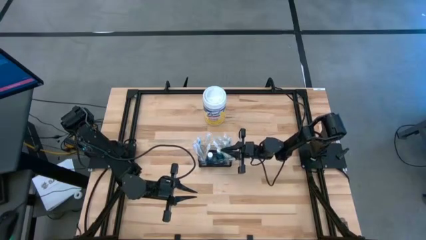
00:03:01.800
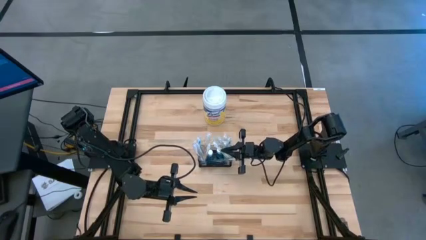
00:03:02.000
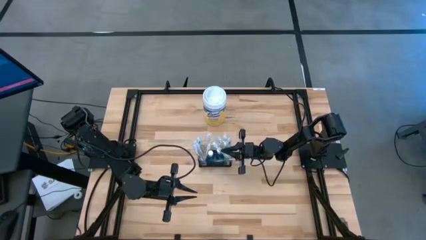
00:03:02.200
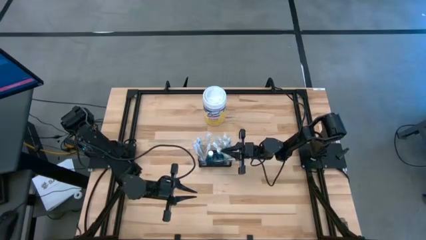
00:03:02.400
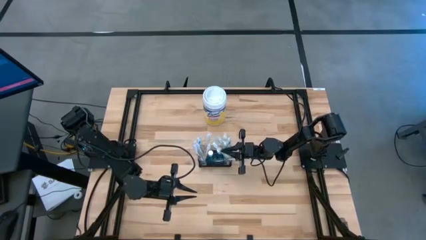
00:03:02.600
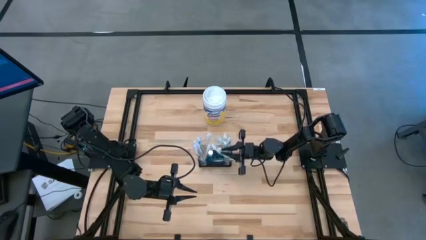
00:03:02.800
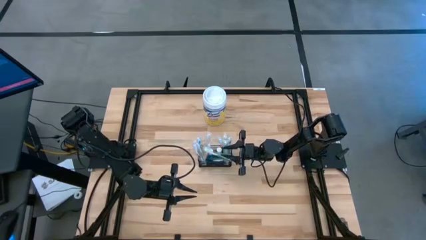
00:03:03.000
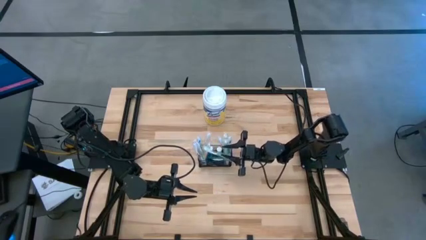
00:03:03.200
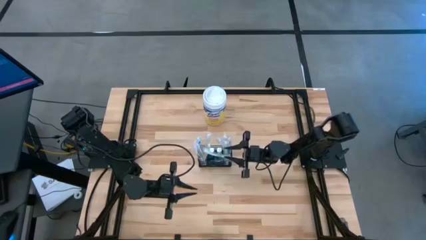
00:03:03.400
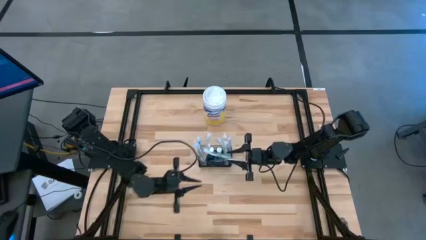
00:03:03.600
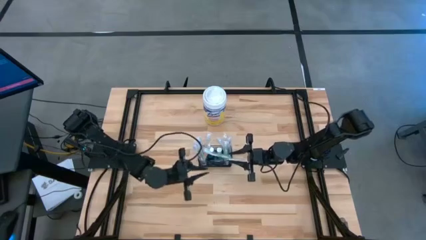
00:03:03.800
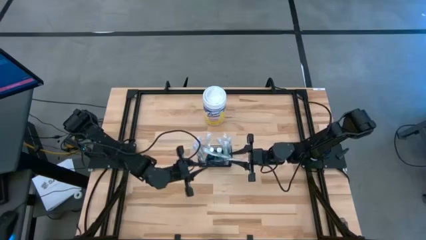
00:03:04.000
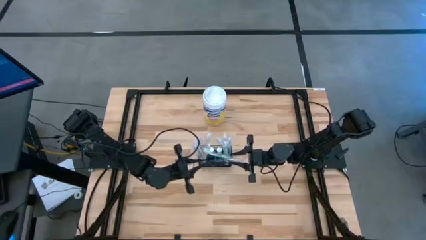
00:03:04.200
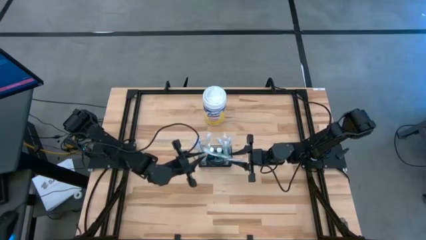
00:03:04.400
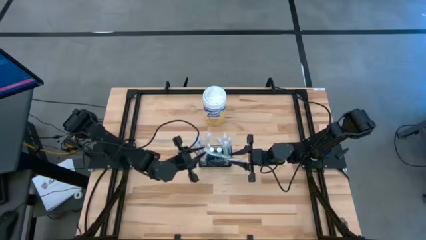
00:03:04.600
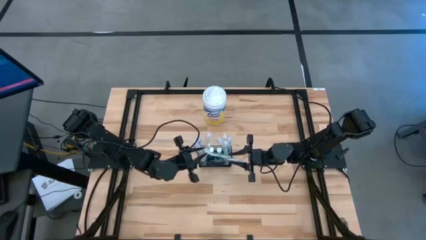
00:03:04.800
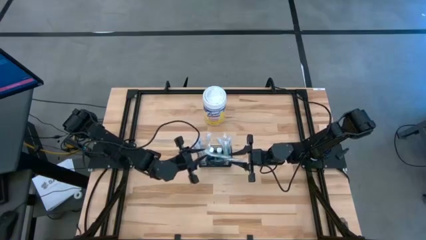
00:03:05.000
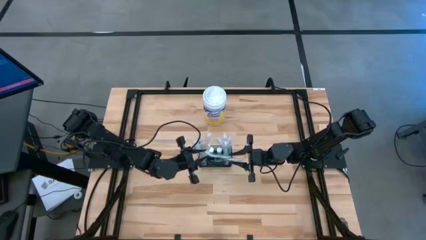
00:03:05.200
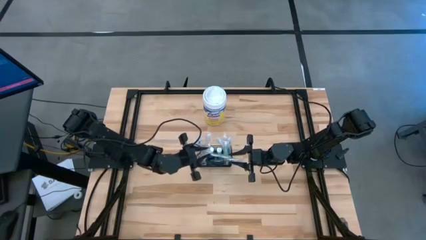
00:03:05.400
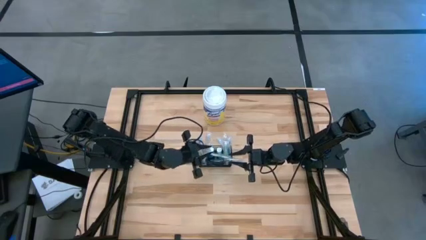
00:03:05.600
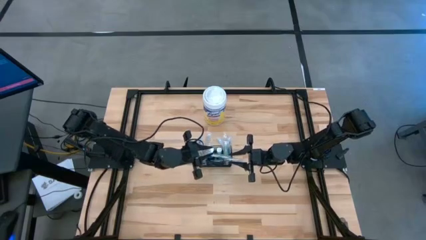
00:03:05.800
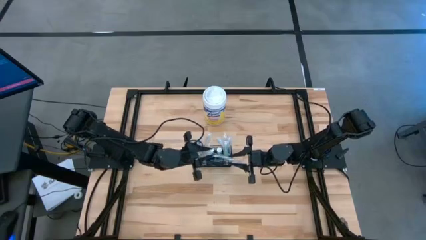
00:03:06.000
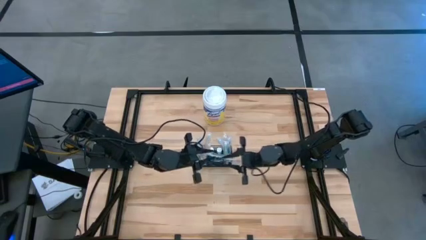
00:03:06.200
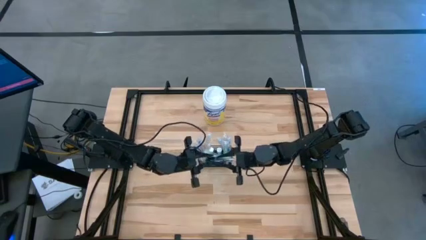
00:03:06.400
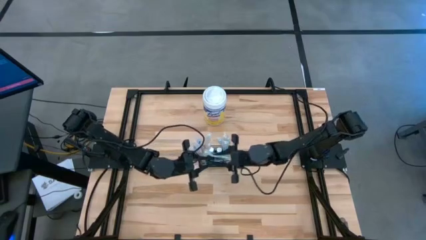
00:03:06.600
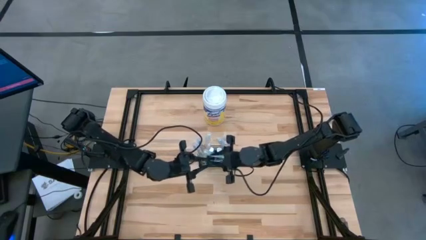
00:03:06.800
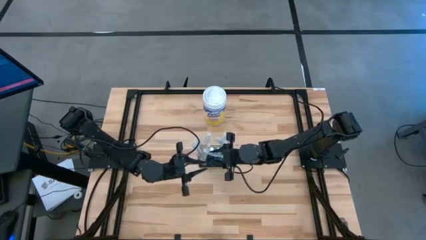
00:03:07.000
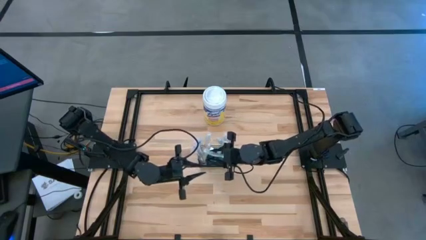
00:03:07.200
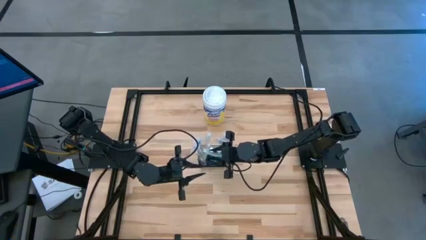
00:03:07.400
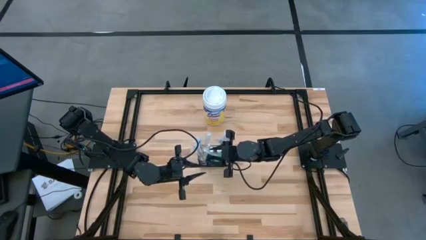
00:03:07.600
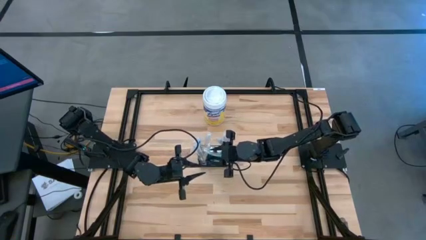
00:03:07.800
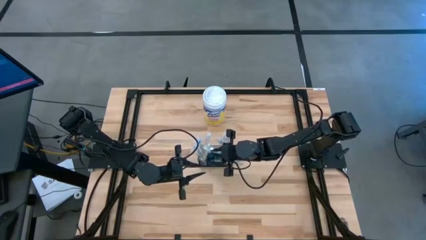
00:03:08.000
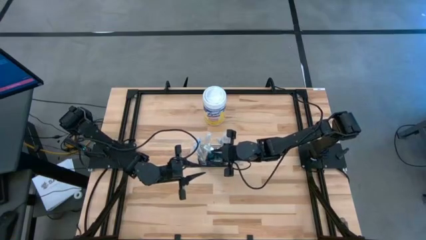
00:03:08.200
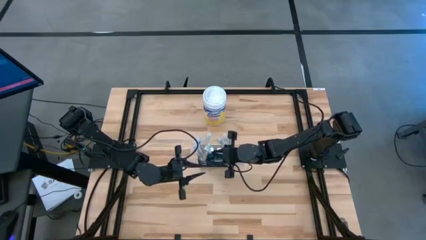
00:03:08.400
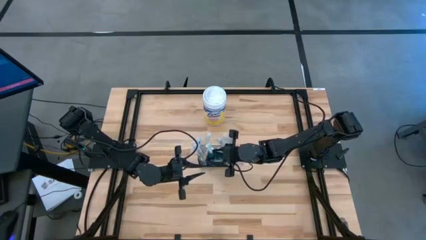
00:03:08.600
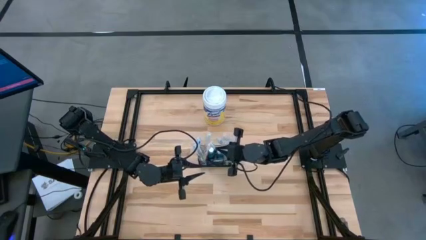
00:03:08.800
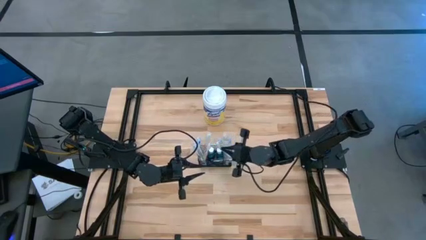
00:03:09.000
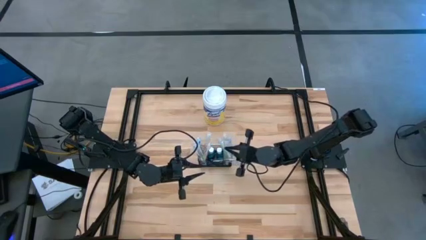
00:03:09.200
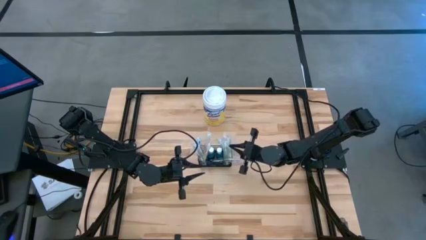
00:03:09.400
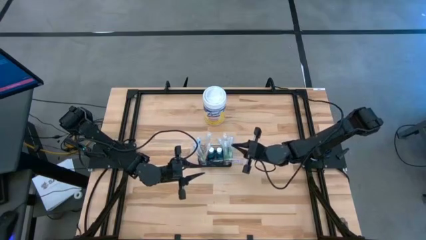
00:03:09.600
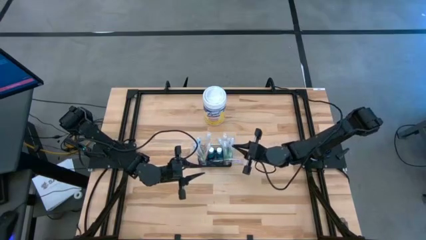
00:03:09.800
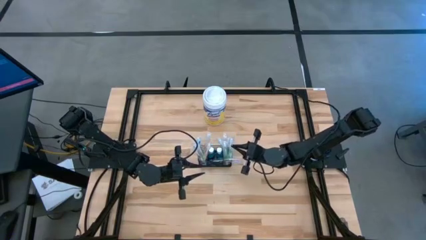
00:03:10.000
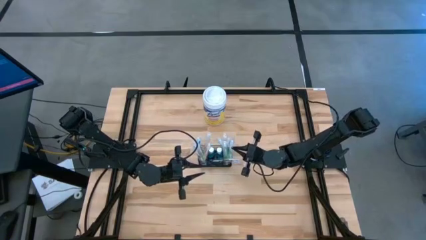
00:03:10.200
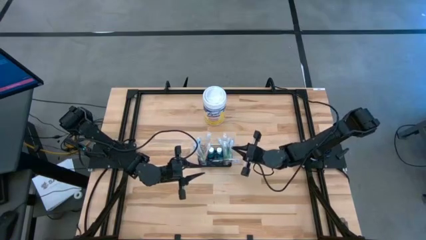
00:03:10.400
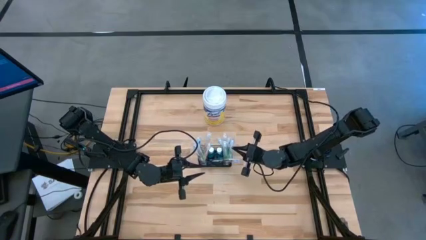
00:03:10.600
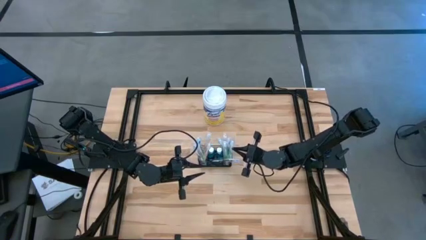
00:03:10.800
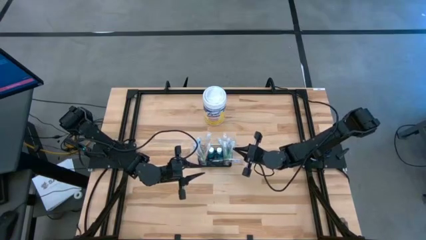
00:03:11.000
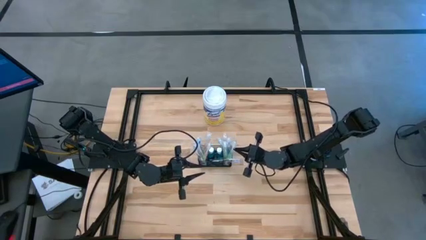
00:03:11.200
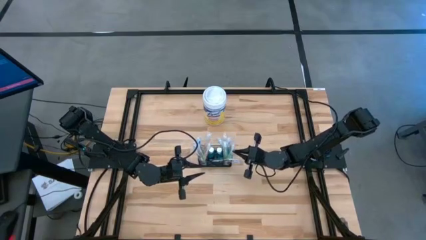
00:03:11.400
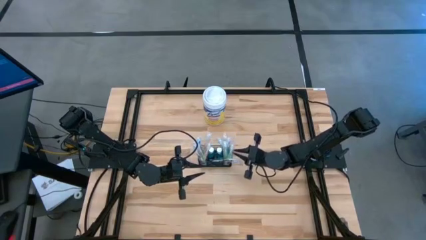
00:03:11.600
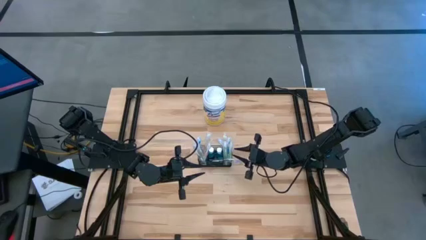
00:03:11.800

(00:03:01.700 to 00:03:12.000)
Task: Pick & Place toothbrushing station
Put the green toothbrush into the mesh organizer

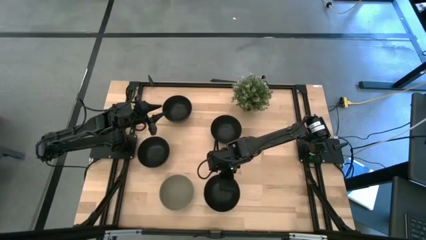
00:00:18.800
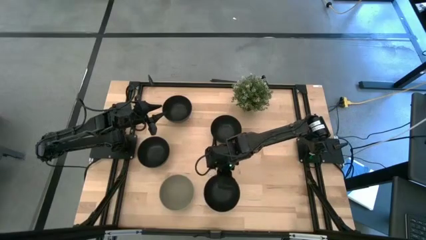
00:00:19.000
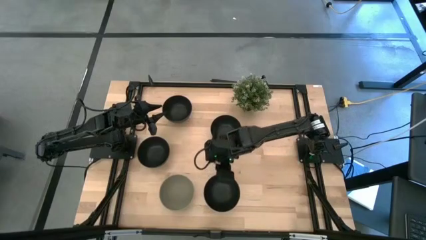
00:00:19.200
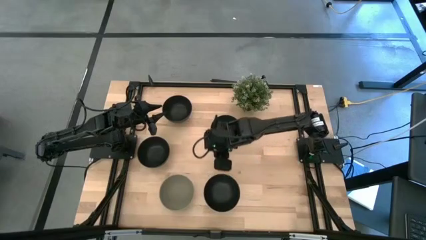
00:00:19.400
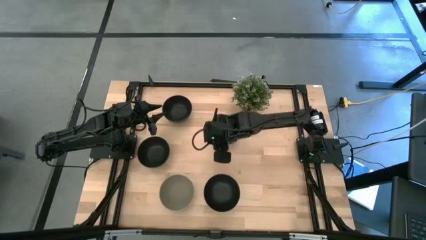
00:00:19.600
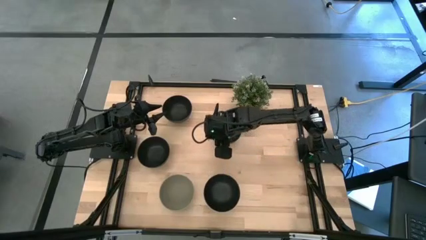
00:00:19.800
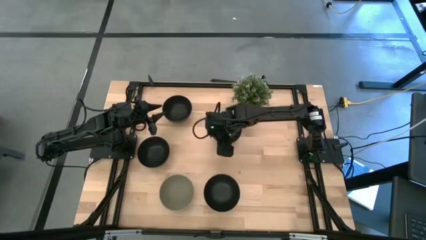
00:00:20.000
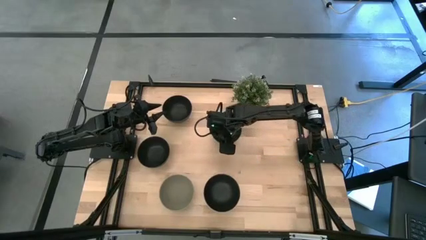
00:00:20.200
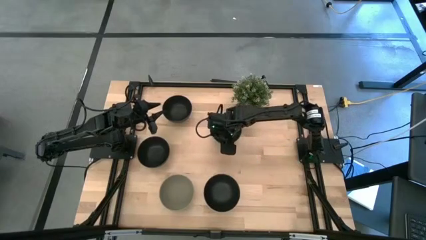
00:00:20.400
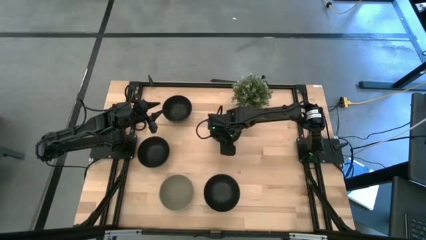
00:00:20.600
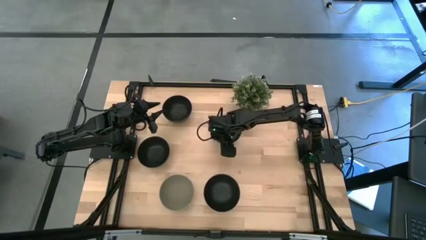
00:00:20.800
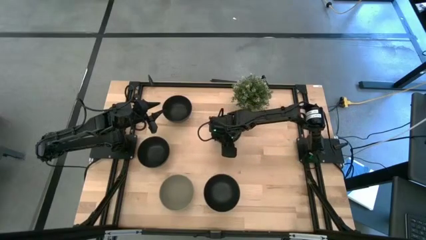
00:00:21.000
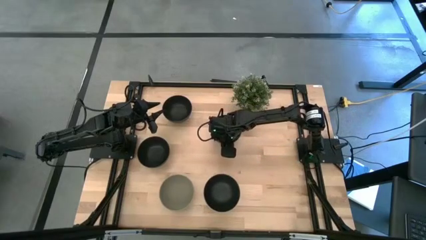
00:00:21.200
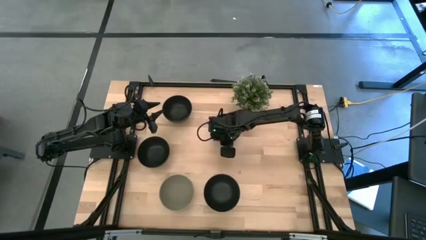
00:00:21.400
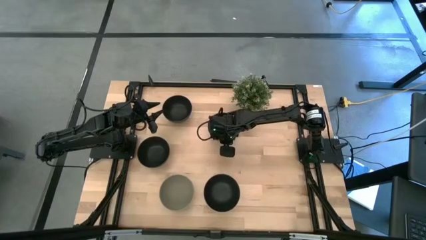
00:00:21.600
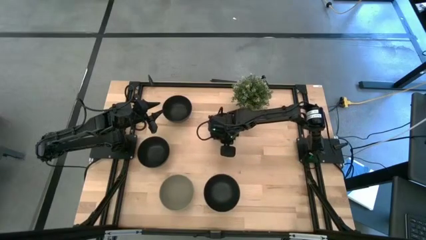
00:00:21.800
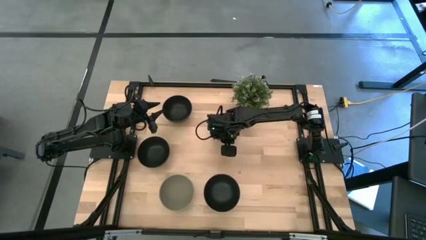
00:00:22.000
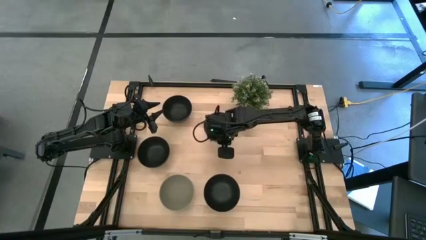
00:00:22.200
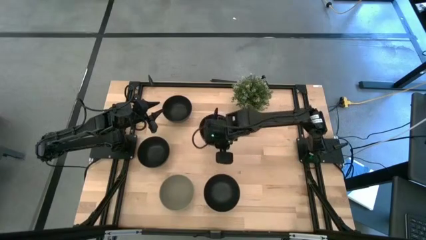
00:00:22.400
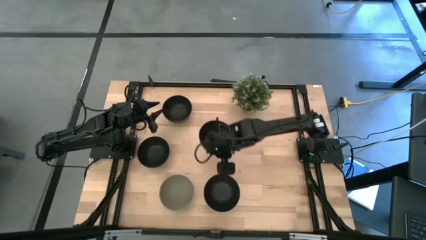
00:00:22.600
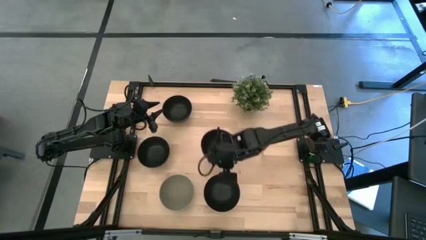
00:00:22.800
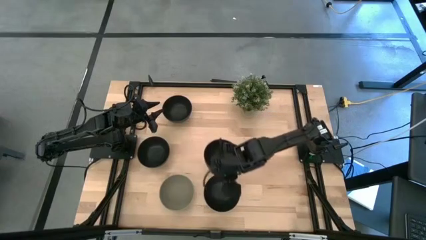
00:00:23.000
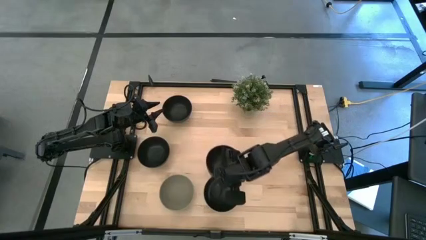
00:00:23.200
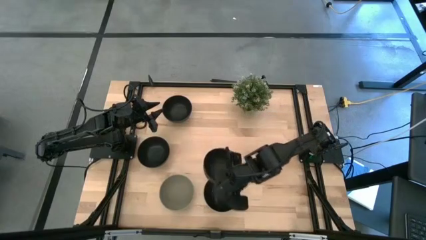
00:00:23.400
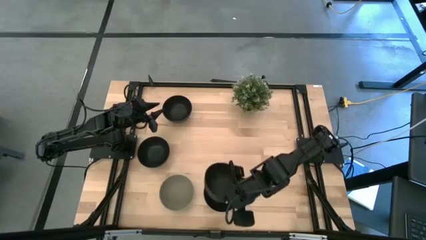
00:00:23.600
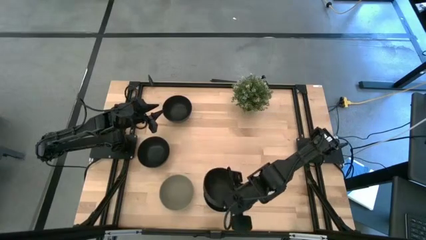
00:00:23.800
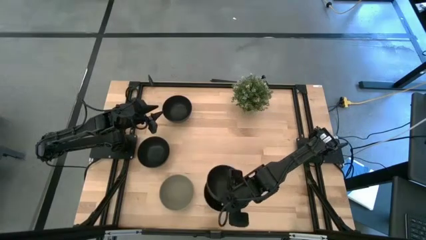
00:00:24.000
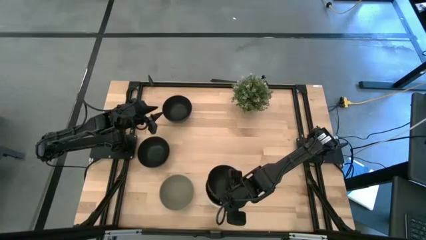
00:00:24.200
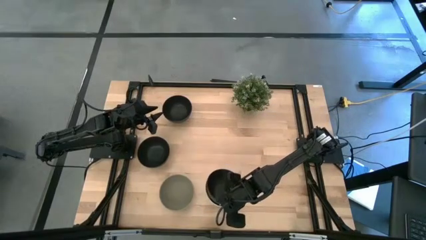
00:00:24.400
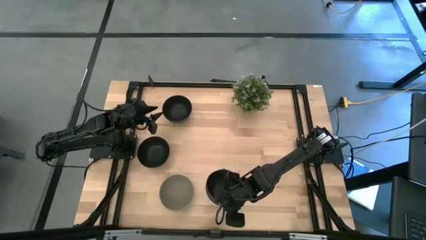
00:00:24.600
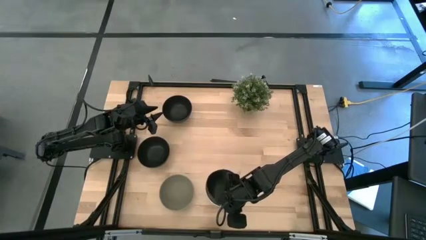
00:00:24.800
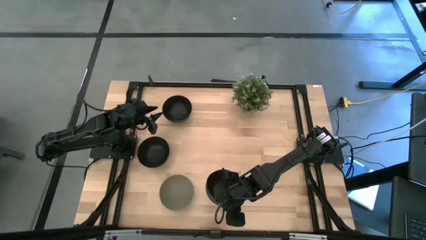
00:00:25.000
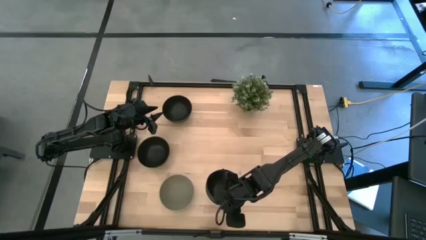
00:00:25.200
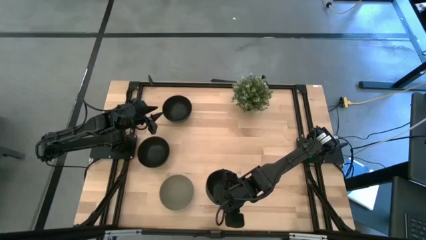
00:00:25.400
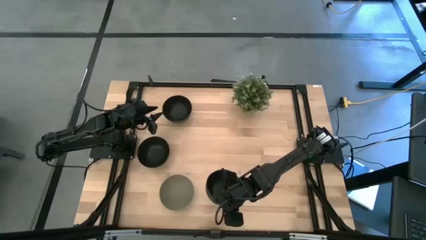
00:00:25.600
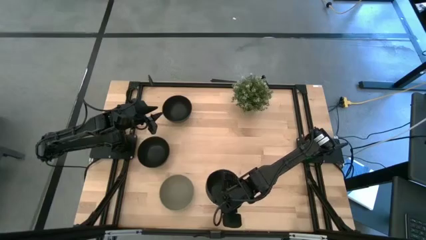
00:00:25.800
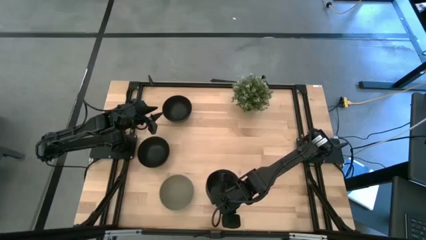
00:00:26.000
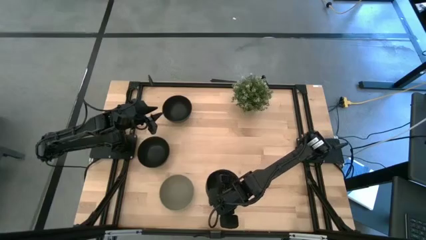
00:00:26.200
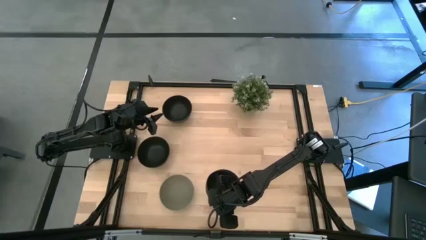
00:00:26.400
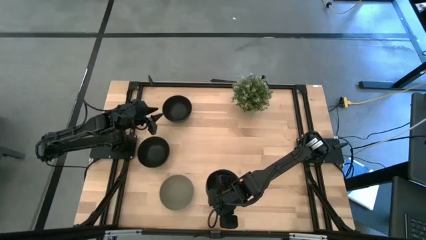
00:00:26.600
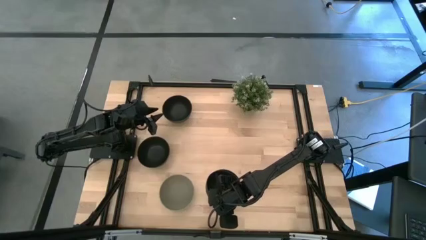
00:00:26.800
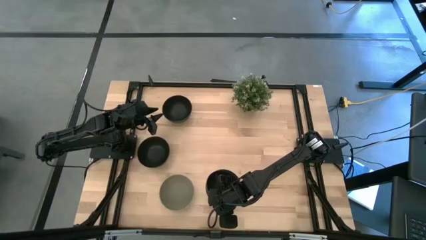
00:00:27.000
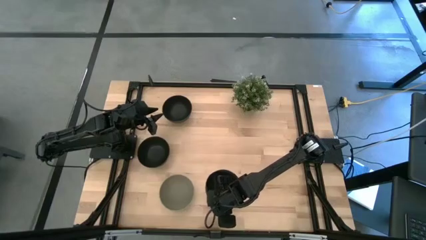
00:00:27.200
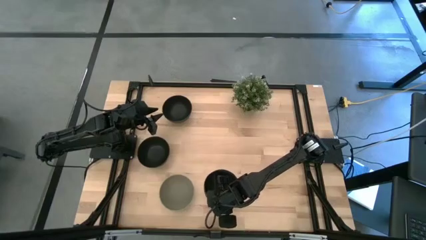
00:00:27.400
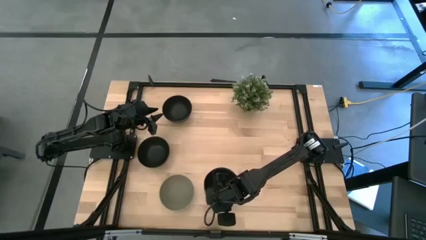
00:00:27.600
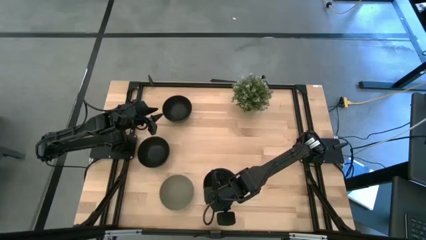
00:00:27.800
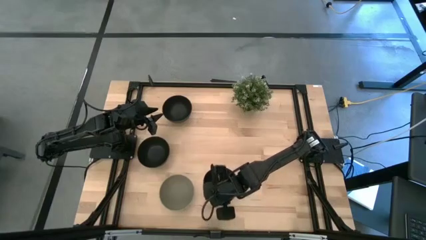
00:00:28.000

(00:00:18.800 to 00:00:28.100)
Task: Nest bowls inside each other
Stack the black bowl on top of the black bowl
